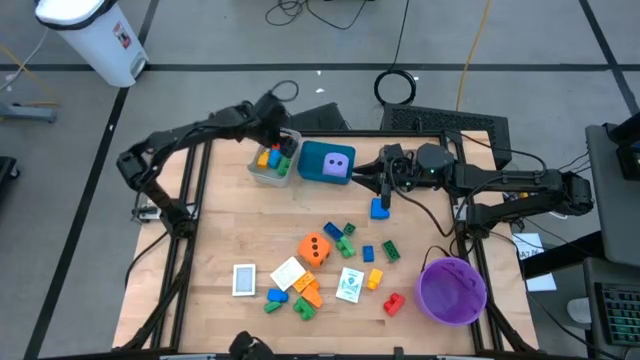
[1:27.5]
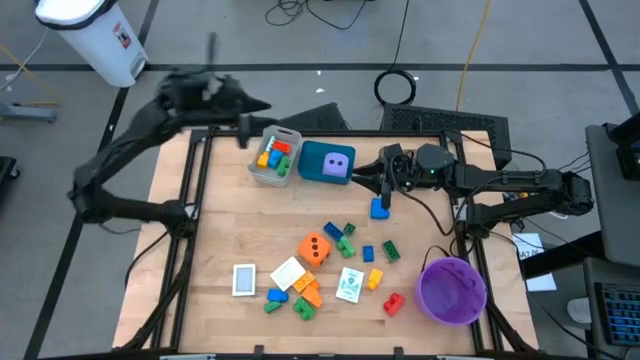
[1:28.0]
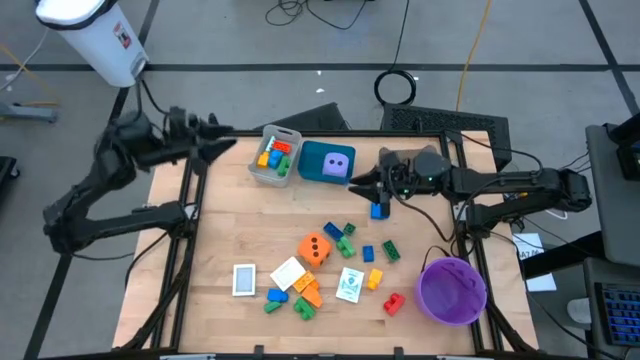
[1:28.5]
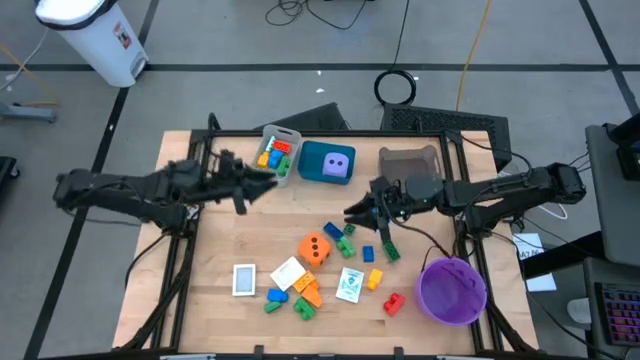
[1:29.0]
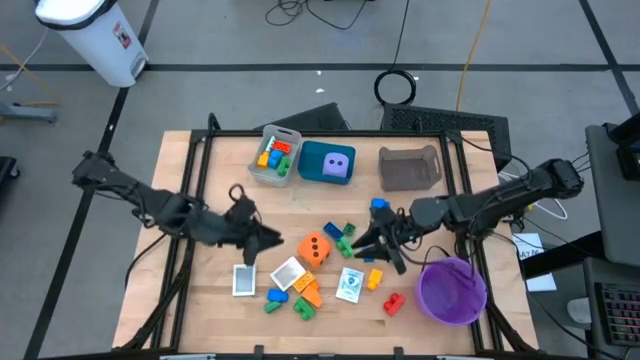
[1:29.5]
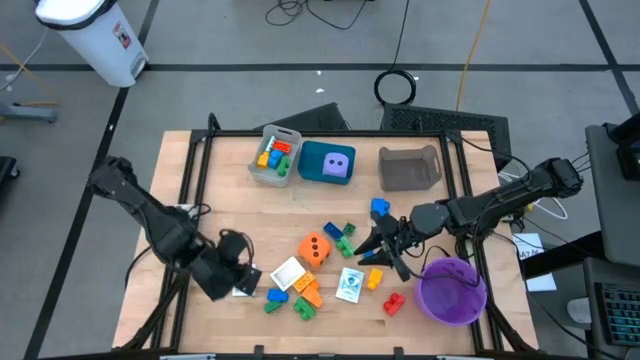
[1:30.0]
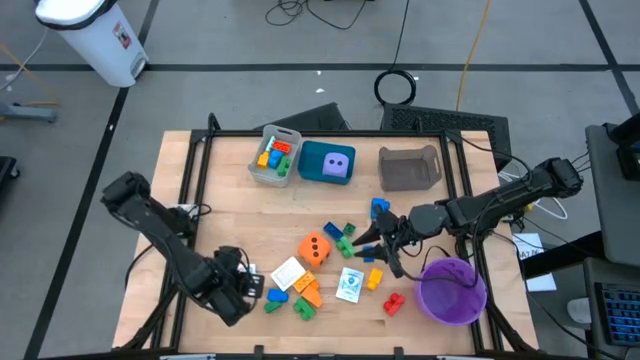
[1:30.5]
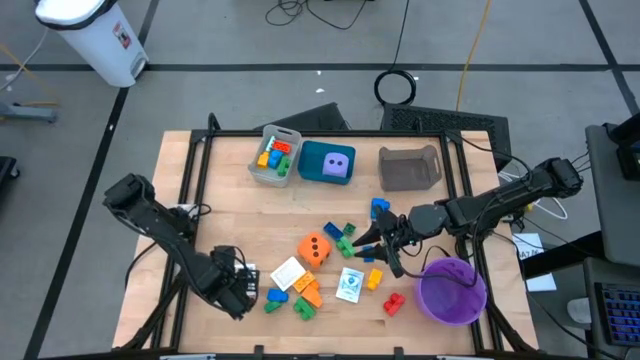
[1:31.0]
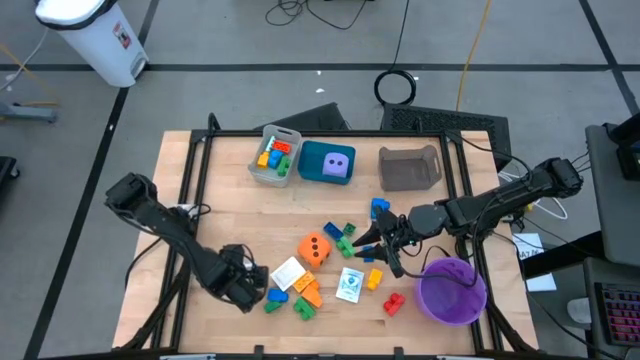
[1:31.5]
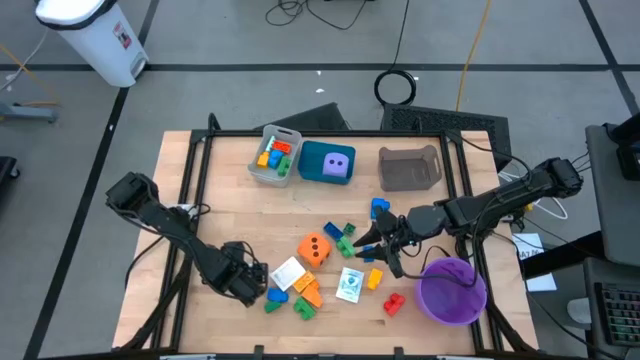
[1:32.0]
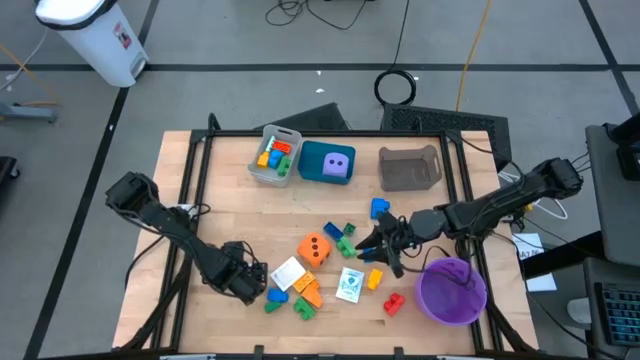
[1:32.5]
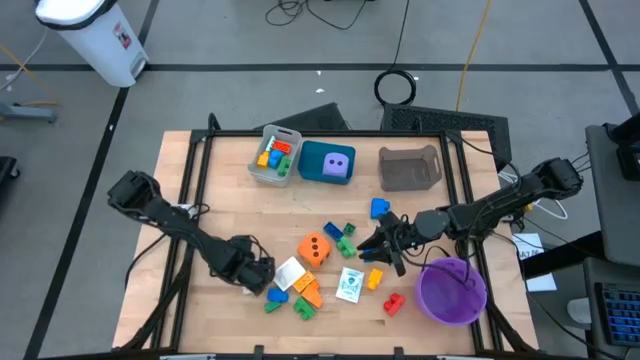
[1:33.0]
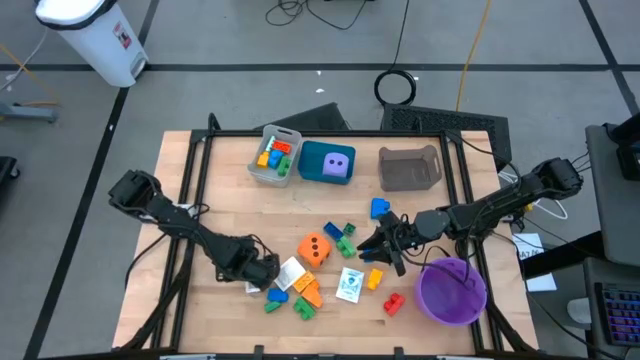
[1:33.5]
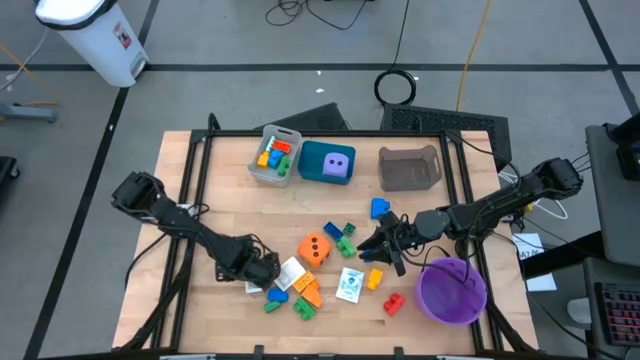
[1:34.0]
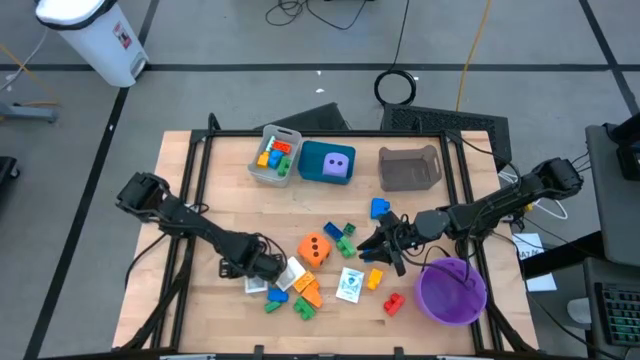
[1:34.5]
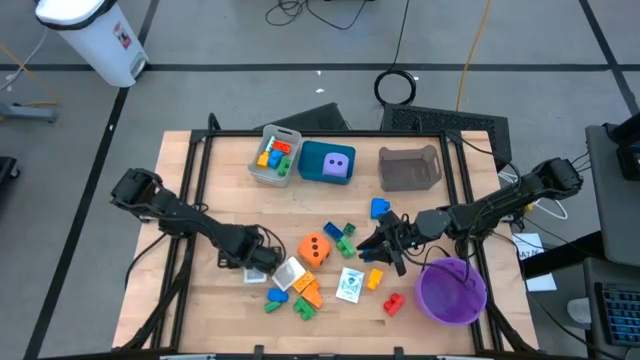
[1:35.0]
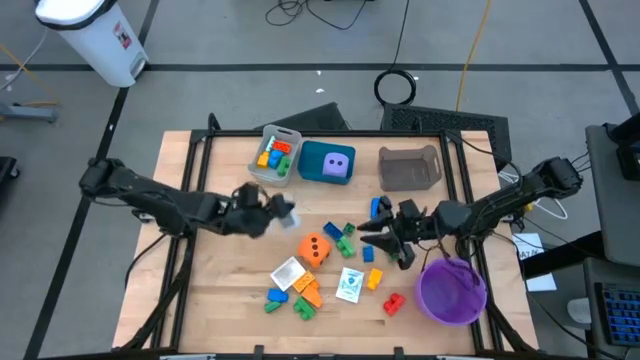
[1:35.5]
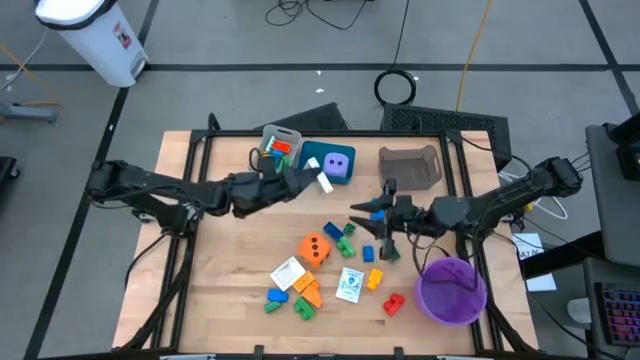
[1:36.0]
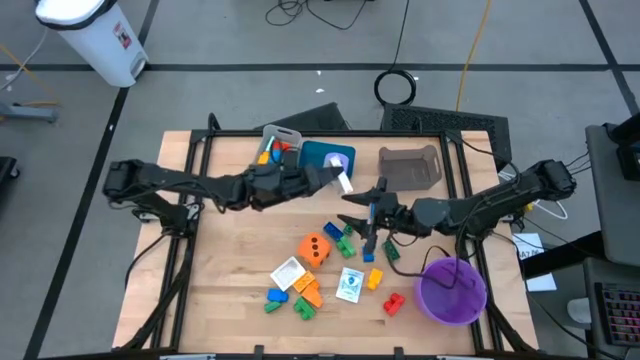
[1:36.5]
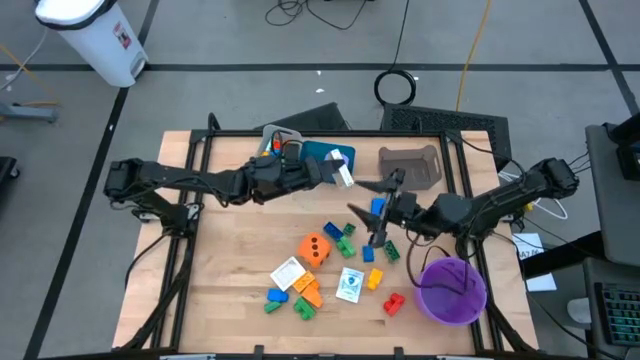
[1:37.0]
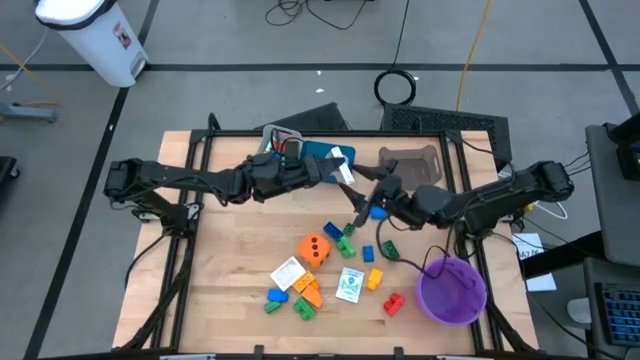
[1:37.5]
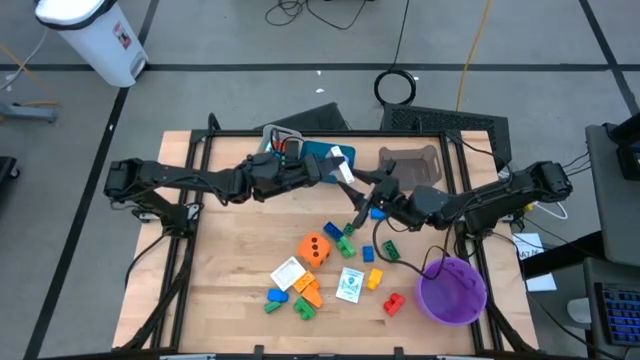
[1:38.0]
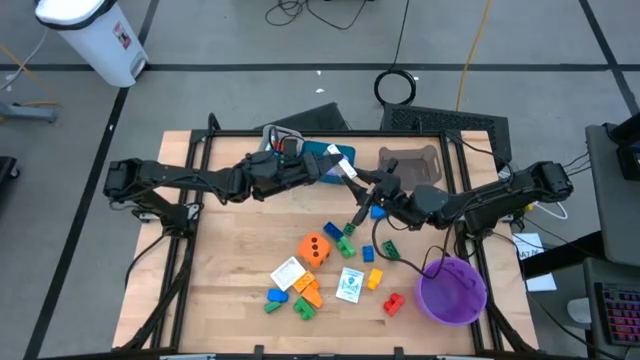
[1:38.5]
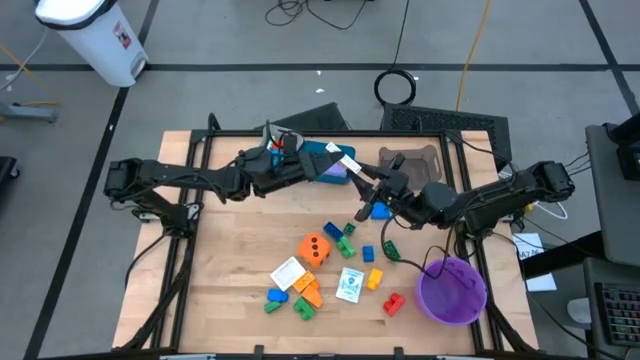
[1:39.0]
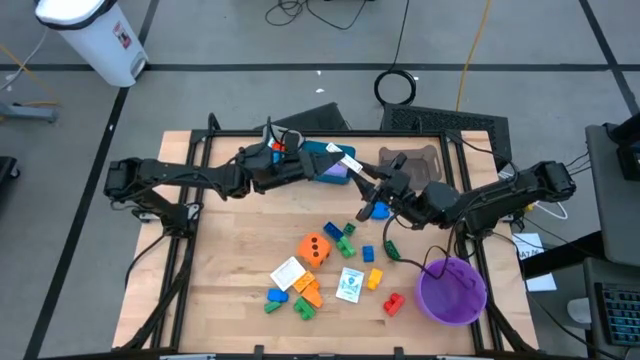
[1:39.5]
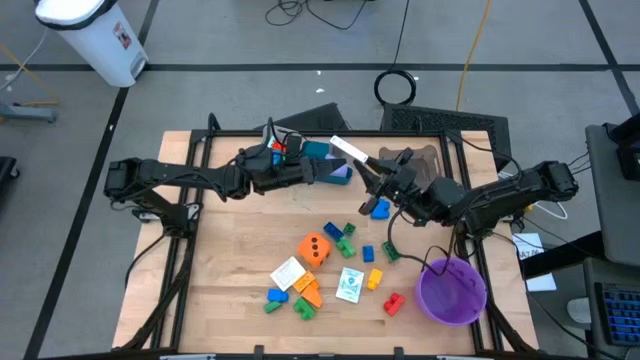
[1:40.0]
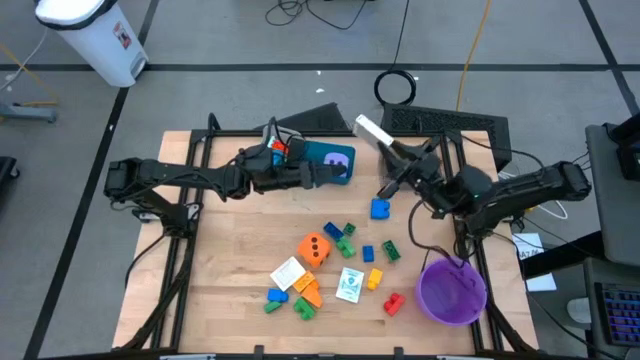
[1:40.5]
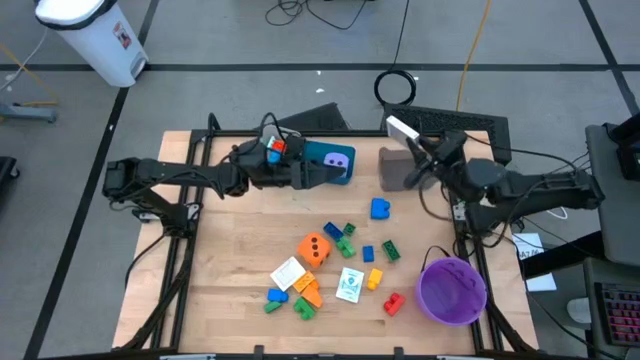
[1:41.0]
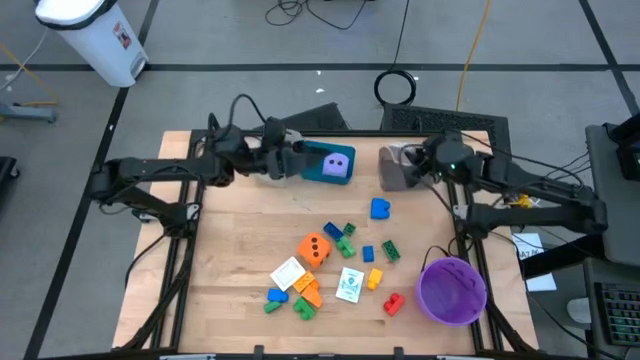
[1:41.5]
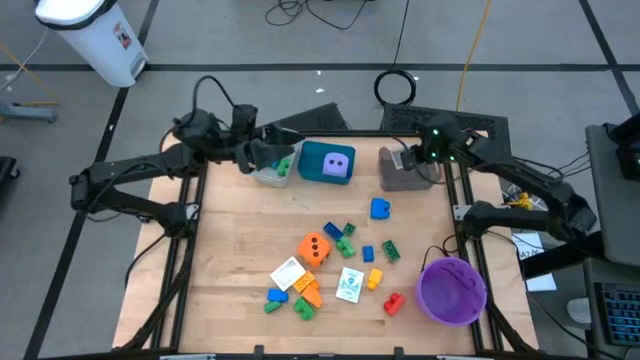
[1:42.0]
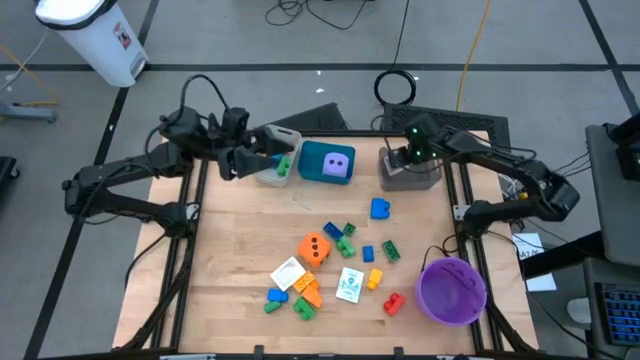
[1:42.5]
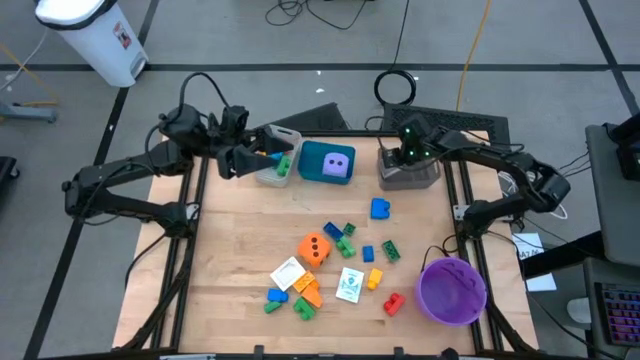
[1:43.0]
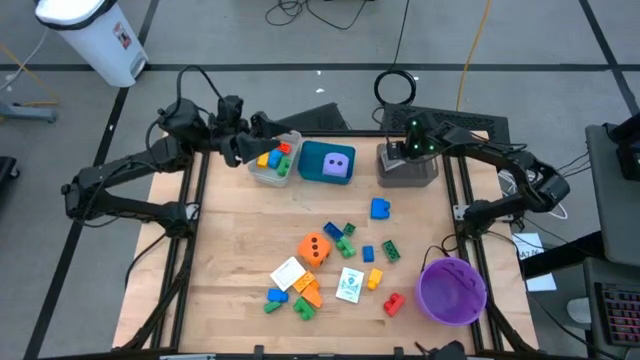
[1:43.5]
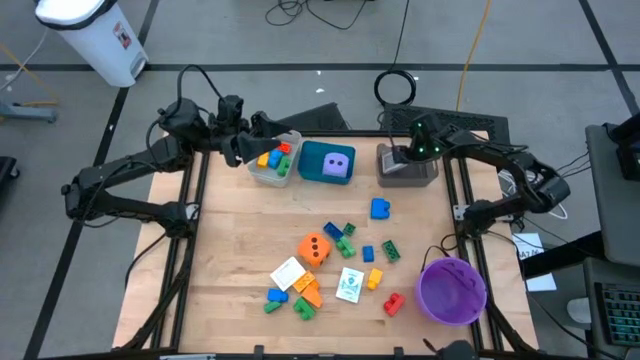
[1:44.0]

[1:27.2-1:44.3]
Task: Pick & Place Toys
Put the black deck of cards into the black bin
